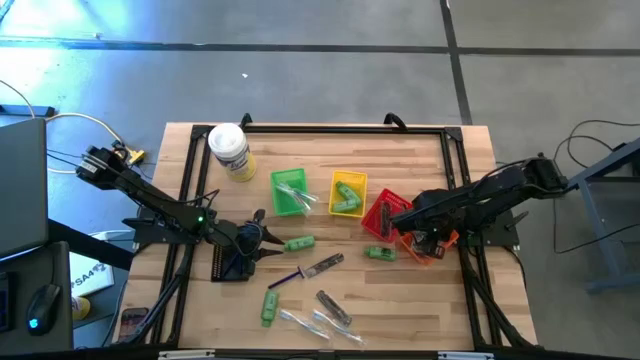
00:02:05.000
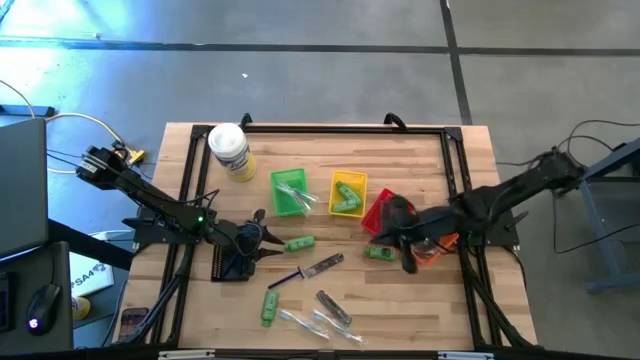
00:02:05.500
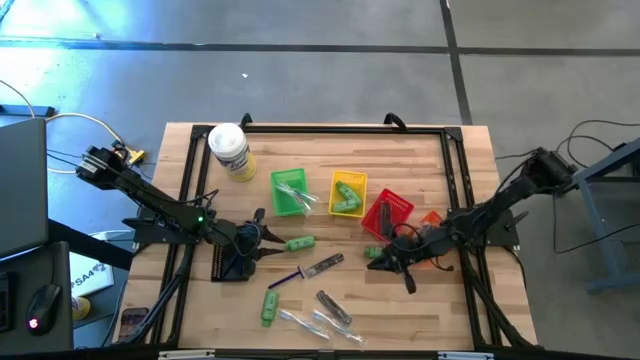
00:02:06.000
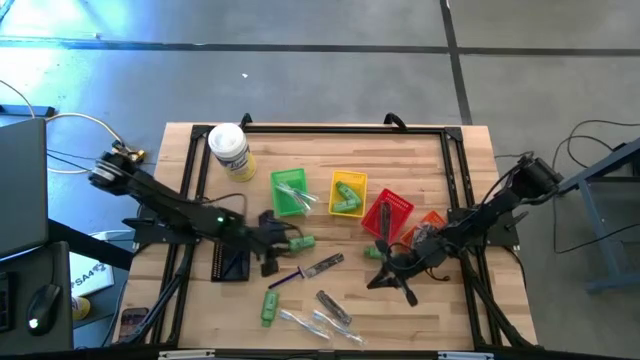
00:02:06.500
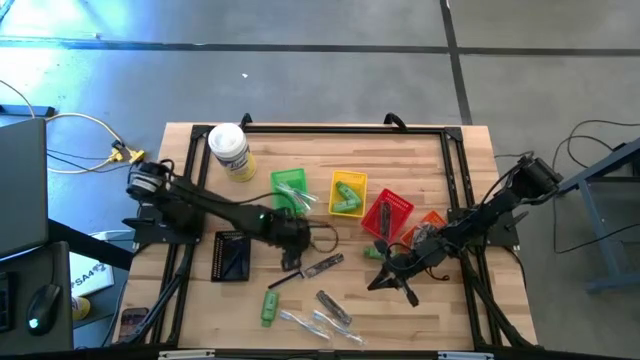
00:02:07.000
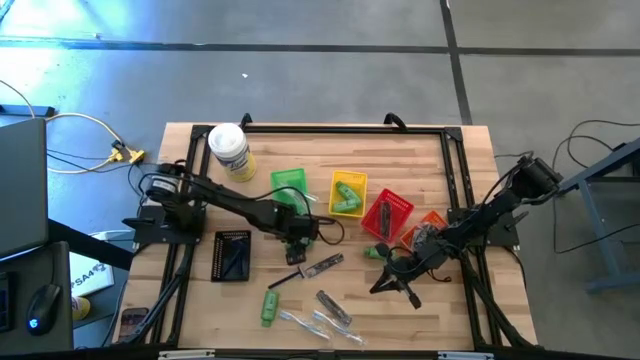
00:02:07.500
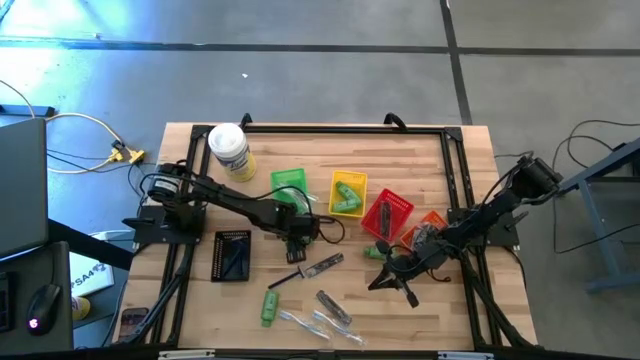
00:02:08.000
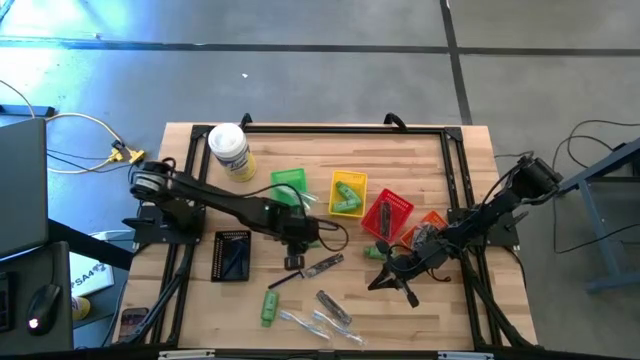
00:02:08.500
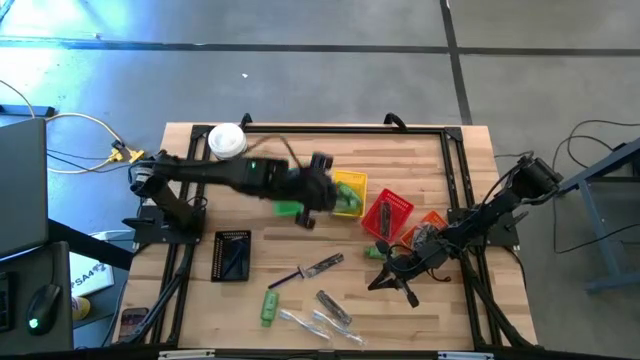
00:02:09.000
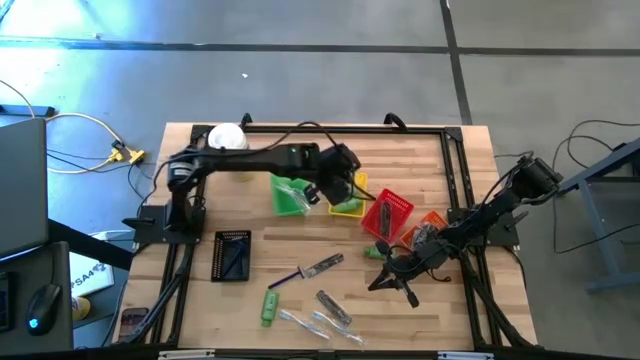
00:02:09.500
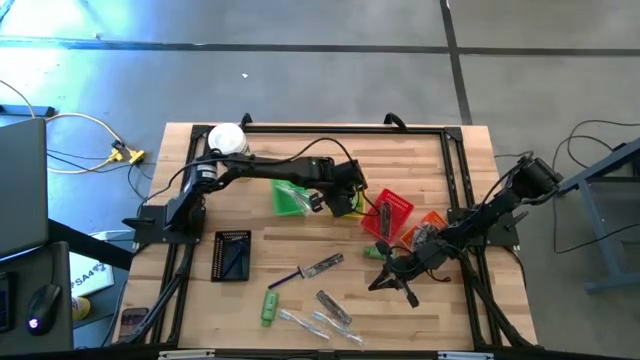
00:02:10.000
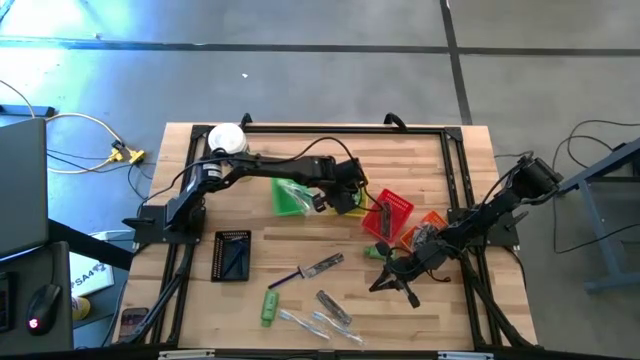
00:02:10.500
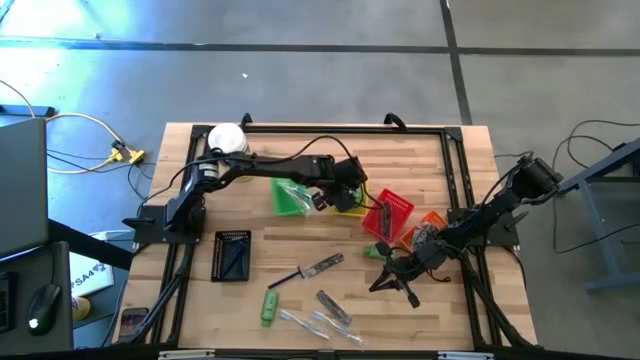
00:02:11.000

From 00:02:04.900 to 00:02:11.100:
Task: Pick & Place Travel size toiletries
Put the green shampoo into the yellow bin

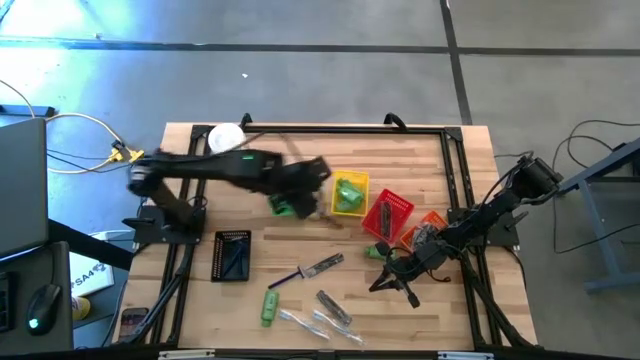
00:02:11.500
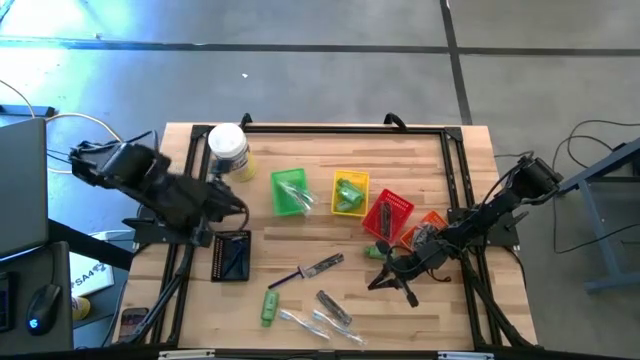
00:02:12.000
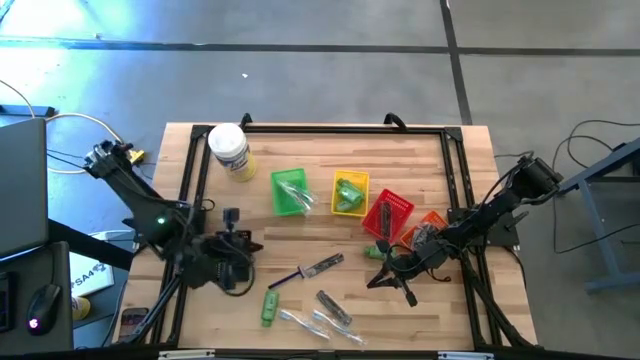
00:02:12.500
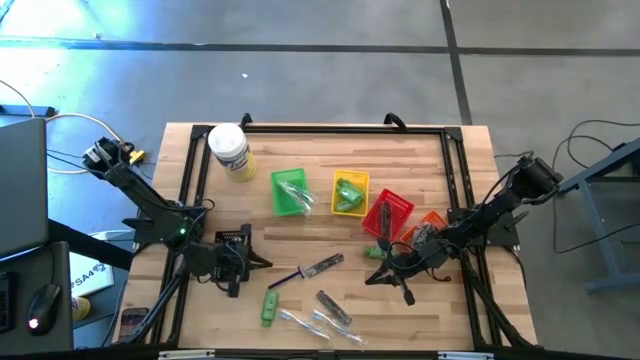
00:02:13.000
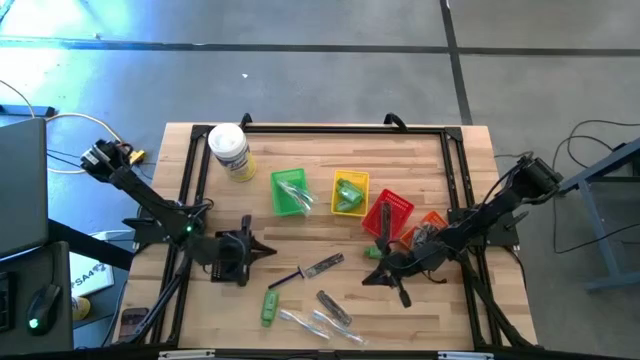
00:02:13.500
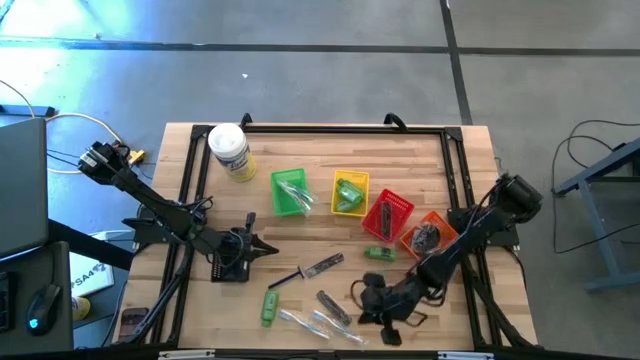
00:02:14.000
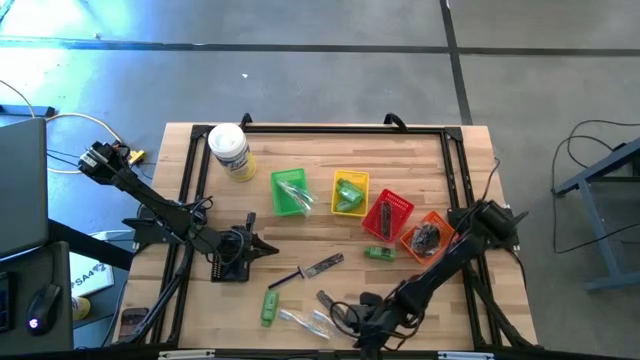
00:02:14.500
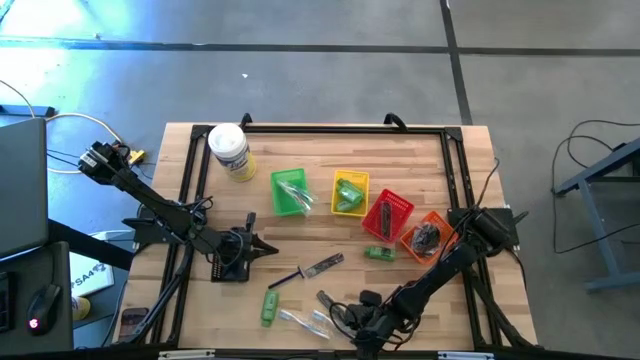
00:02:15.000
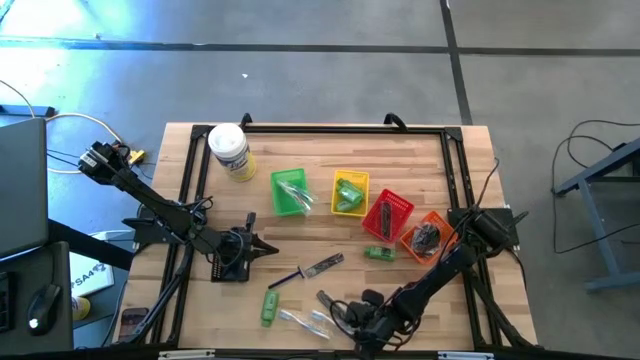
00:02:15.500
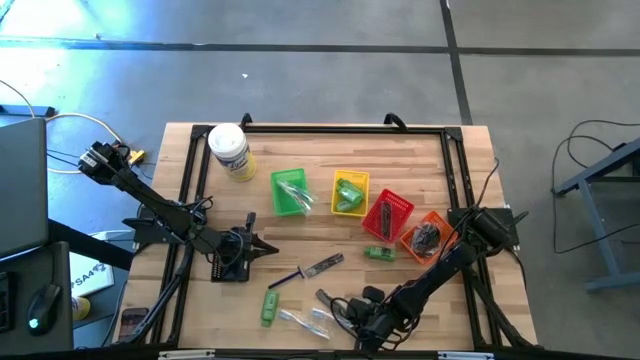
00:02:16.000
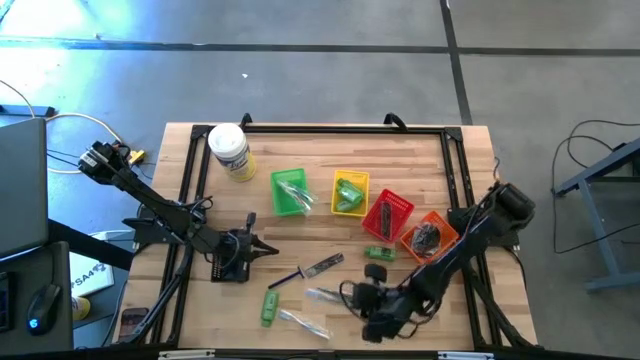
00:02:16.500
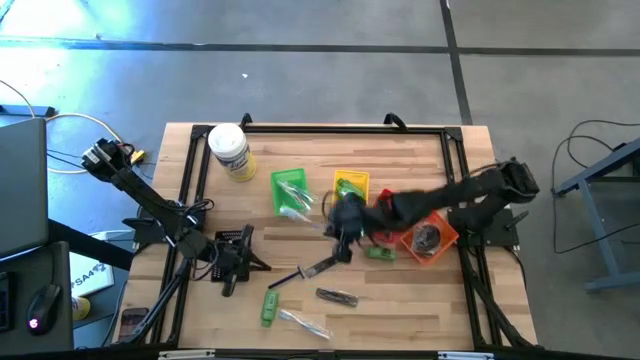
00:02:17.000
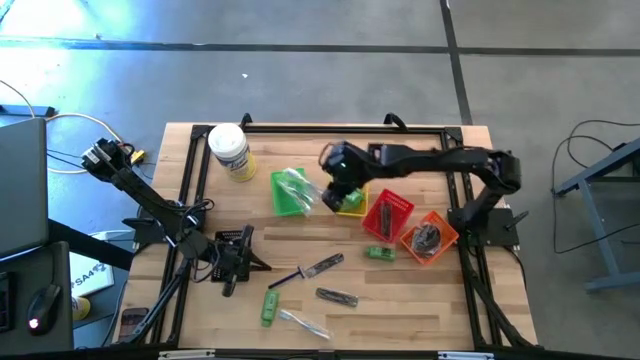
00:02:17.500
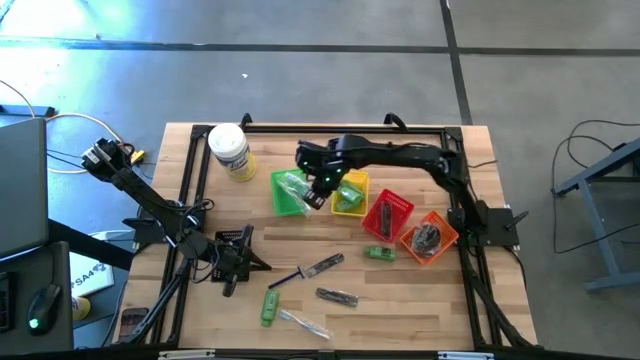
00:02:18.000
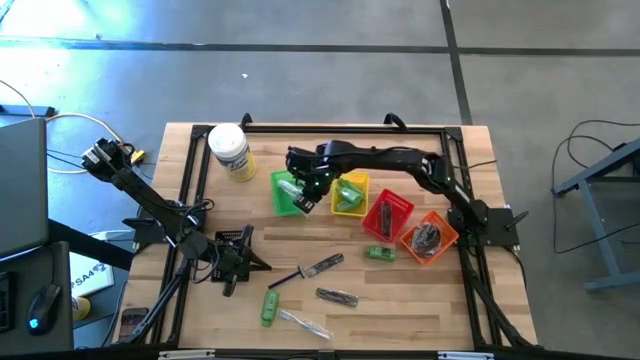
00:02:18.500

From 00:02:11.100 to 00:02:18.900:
Put the blue toothbrush into the green bin

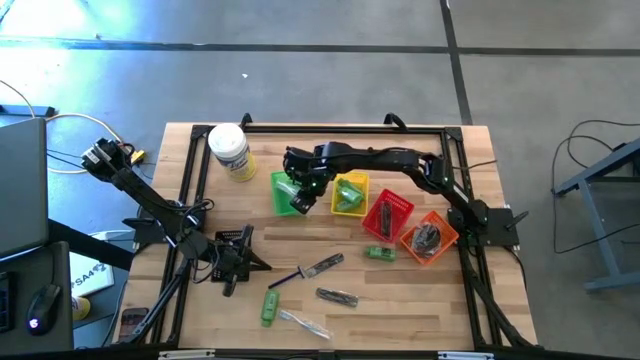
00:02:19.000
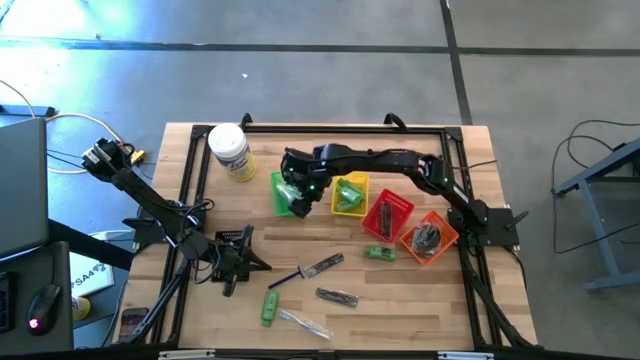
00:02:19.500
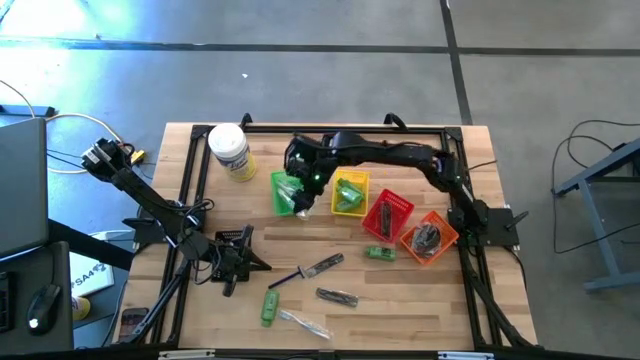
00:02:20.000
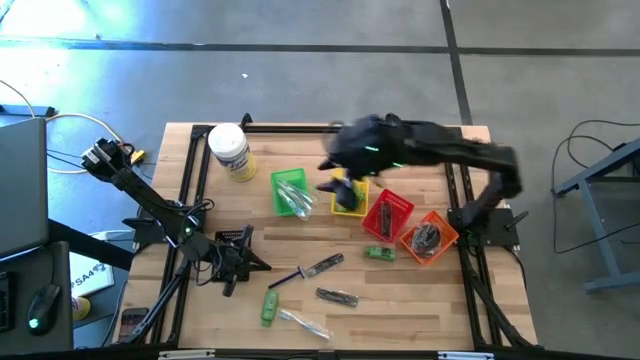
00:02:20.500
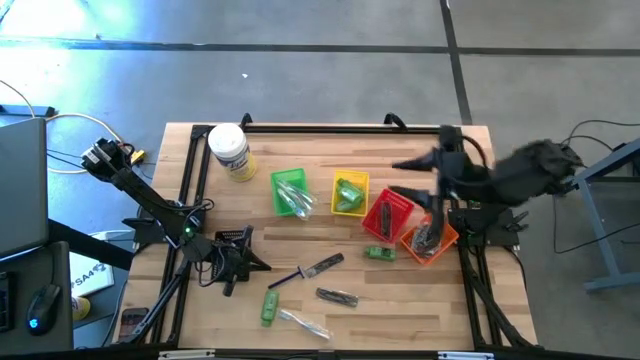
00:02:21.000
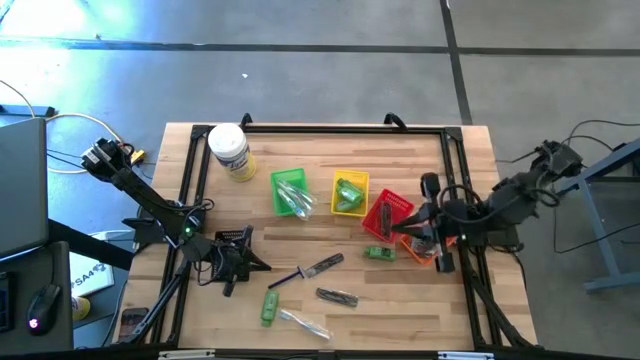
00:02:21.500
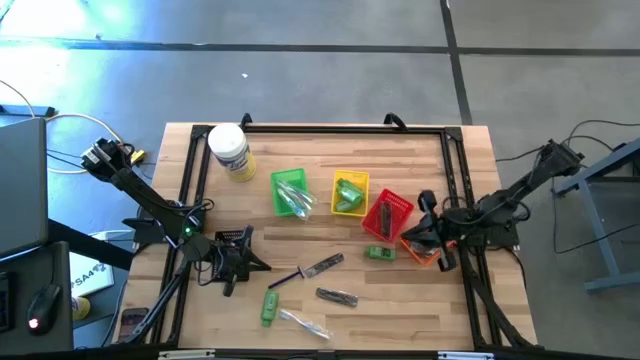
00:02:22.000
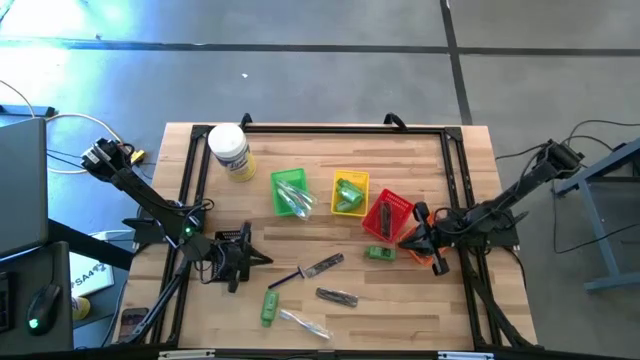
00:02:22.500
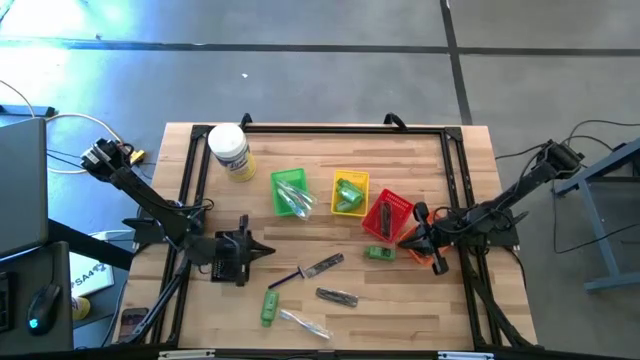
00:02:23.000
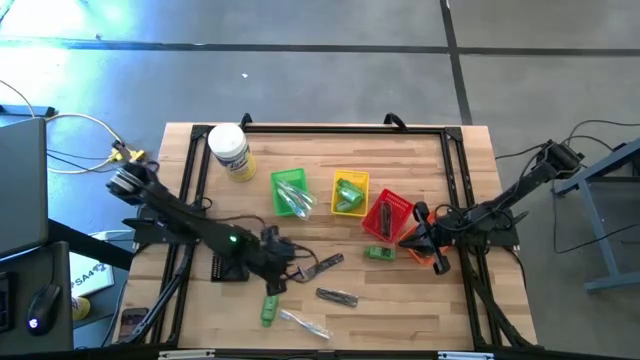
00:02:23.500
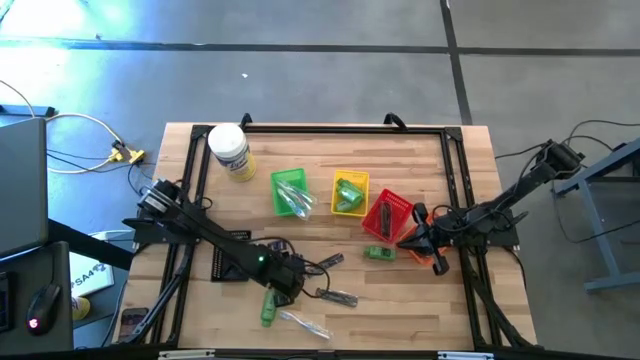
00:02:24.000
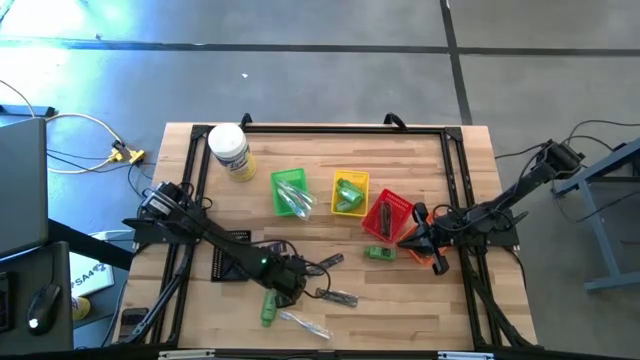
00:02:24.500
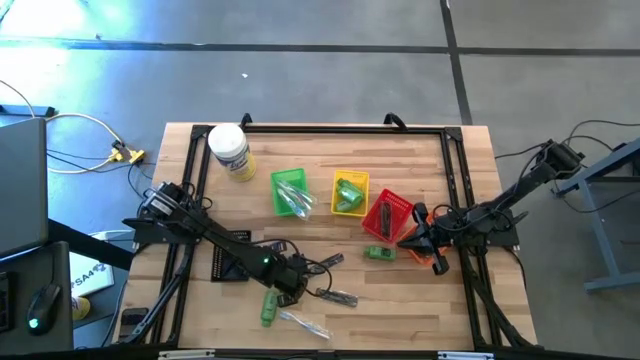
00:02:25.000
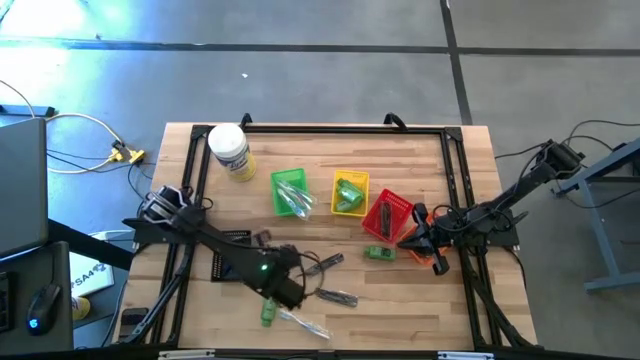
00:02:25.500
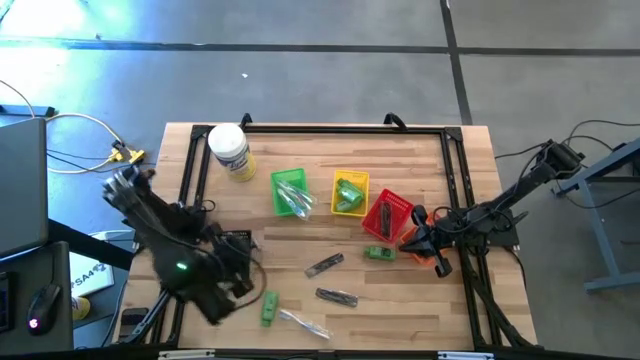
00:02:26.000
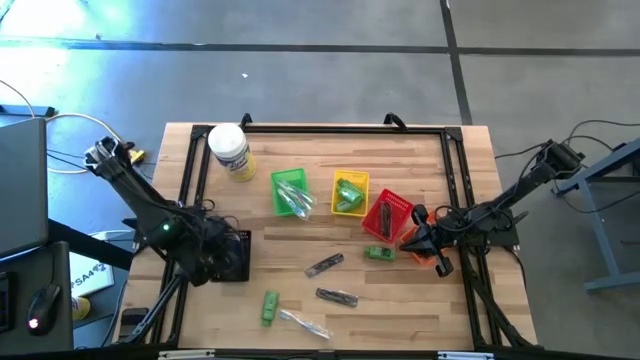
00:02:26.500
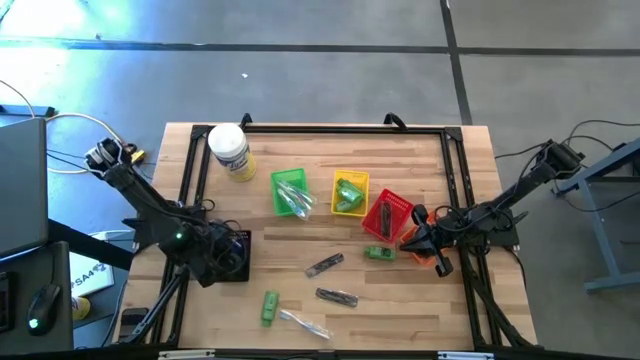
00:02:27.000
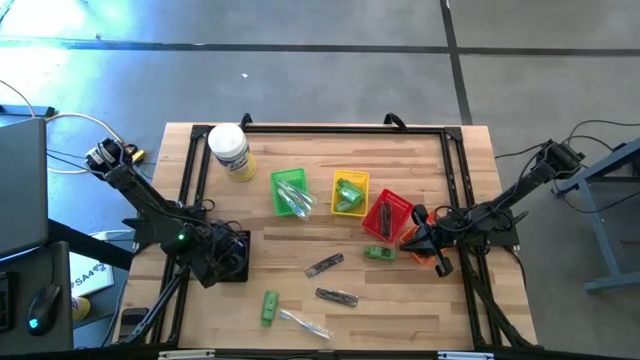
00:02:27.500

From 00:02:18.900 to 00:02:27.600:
Put the blue razor into the black bin
